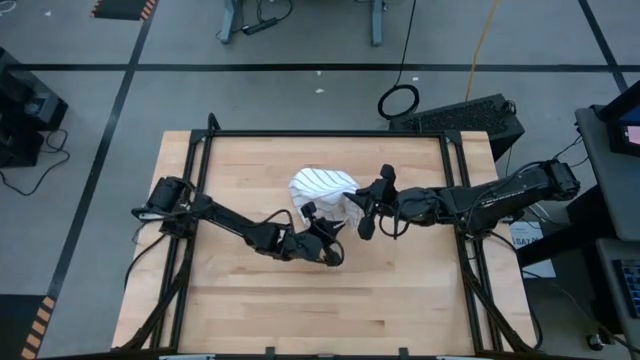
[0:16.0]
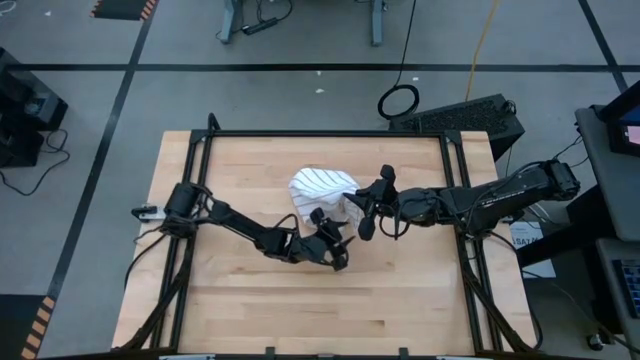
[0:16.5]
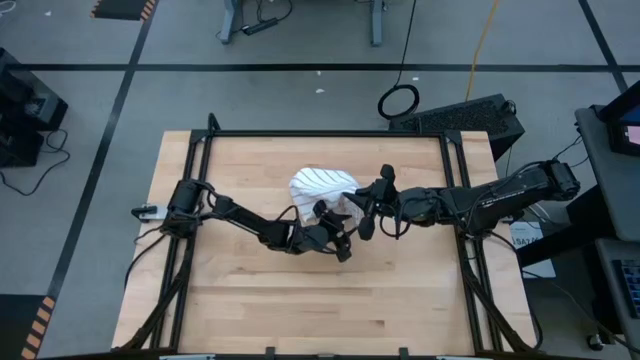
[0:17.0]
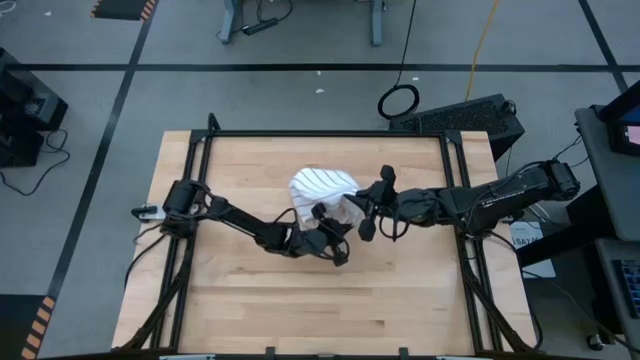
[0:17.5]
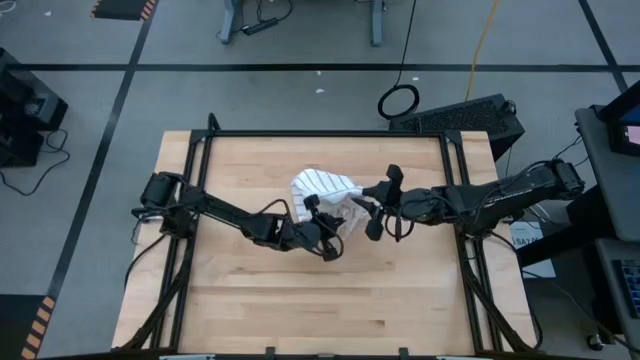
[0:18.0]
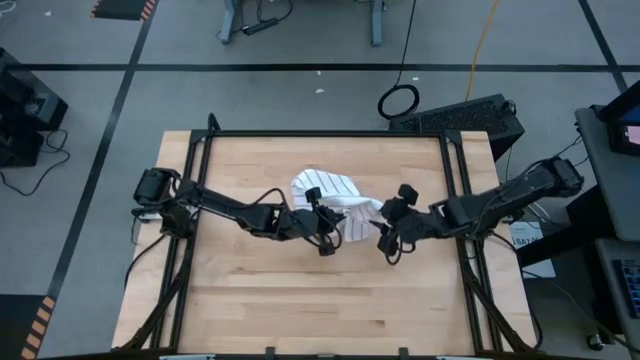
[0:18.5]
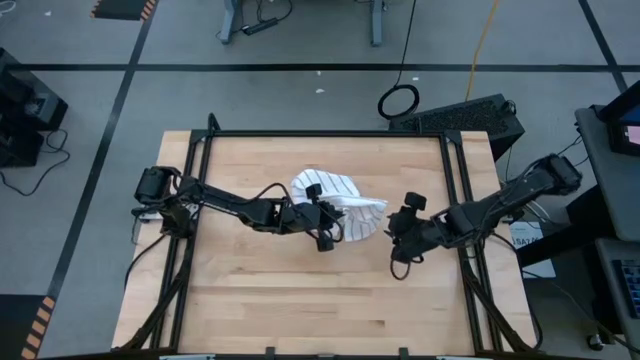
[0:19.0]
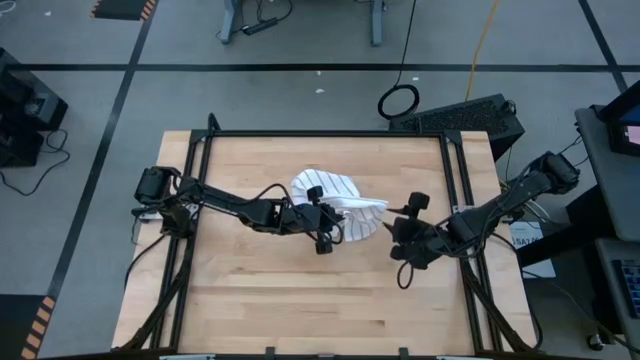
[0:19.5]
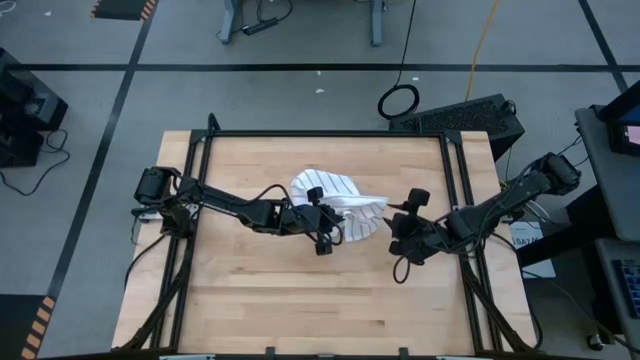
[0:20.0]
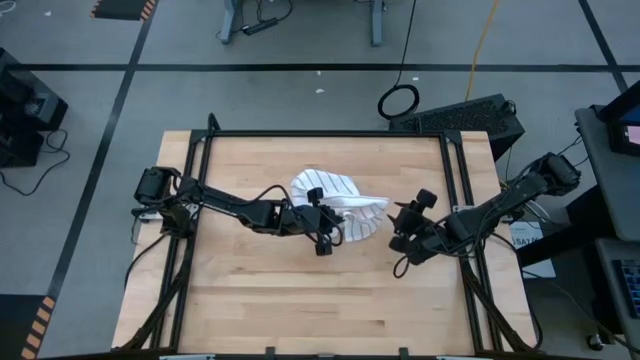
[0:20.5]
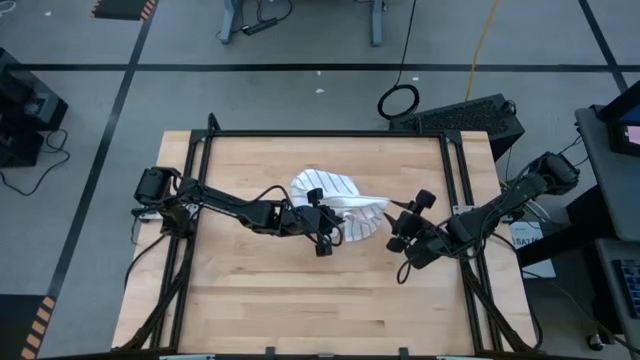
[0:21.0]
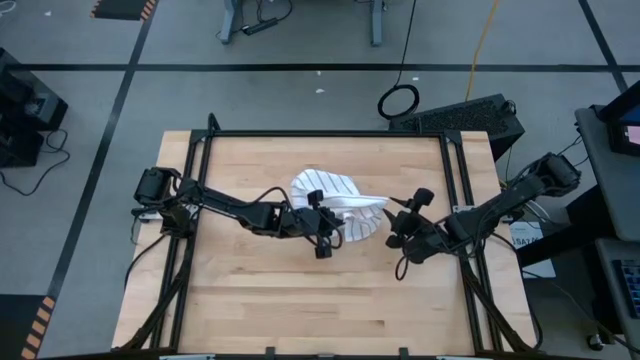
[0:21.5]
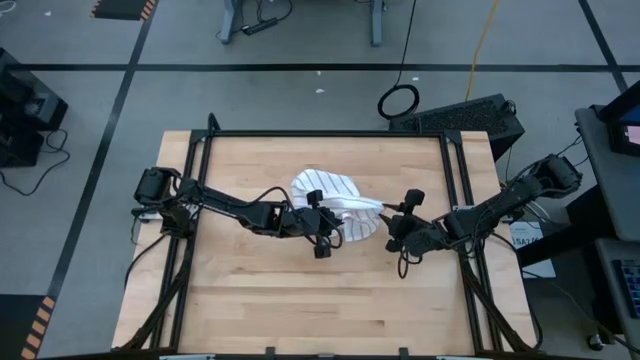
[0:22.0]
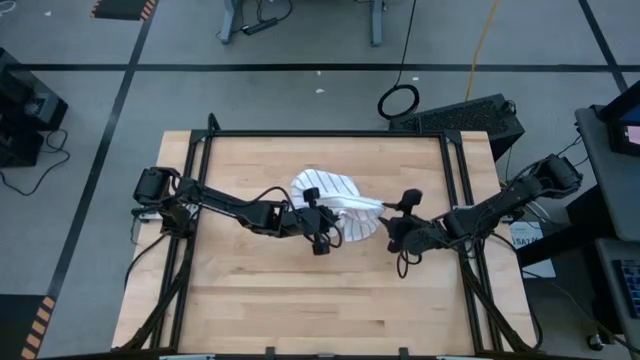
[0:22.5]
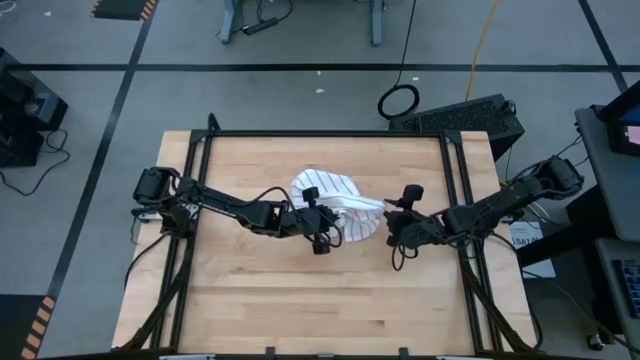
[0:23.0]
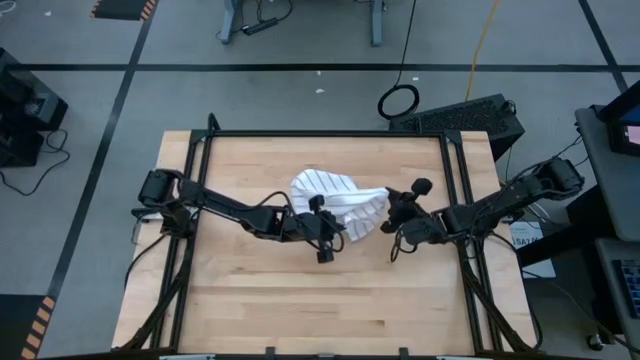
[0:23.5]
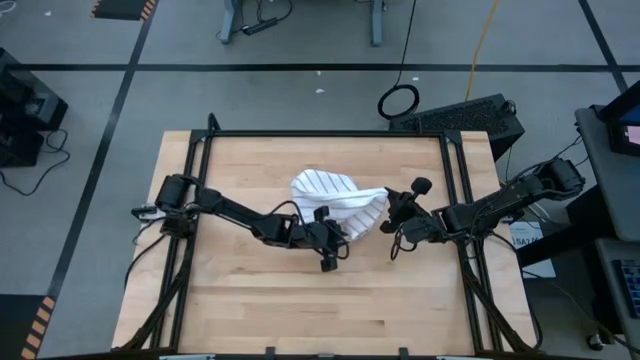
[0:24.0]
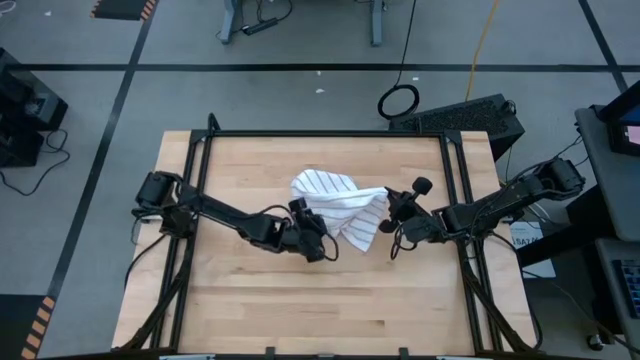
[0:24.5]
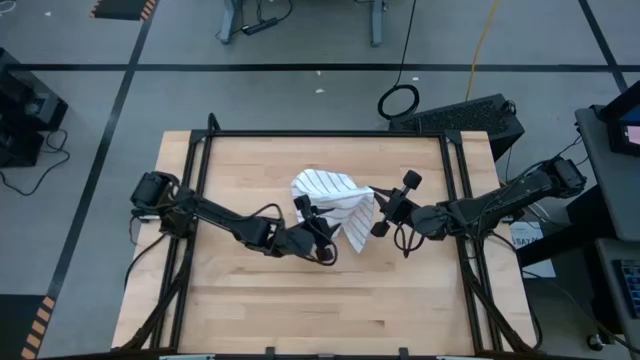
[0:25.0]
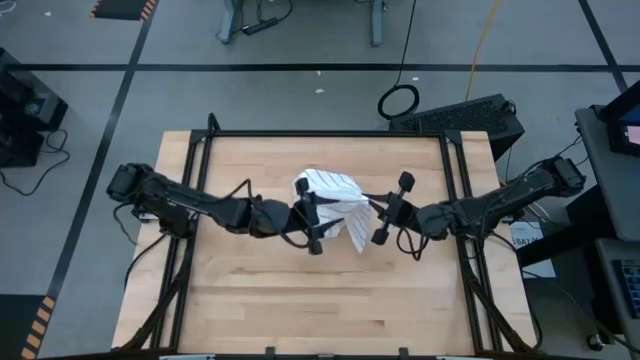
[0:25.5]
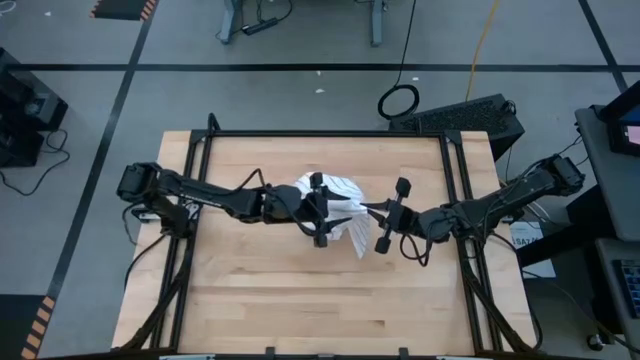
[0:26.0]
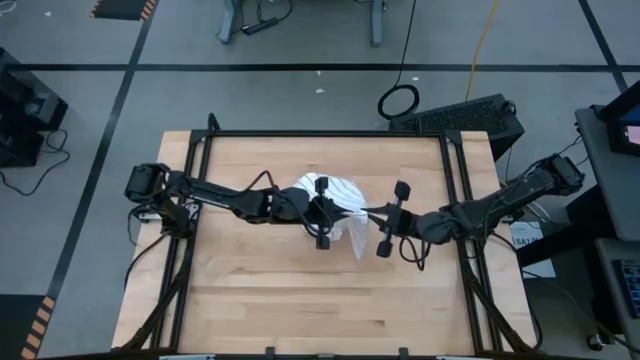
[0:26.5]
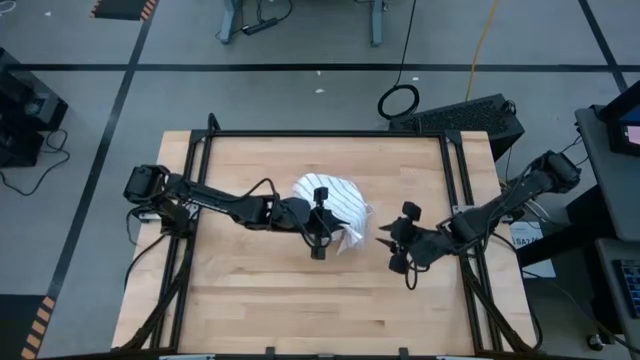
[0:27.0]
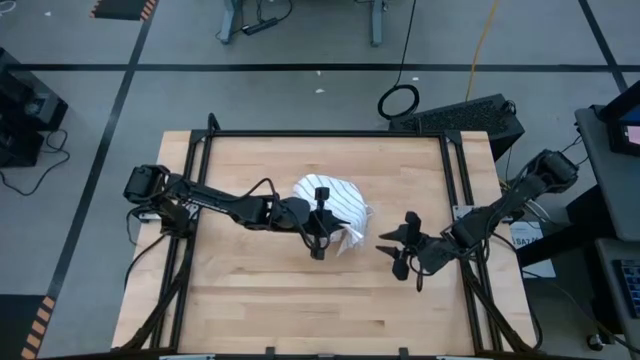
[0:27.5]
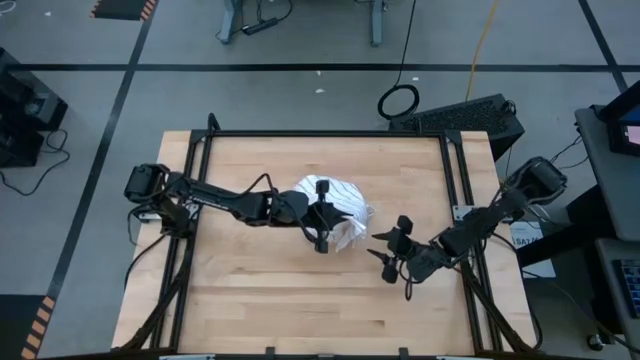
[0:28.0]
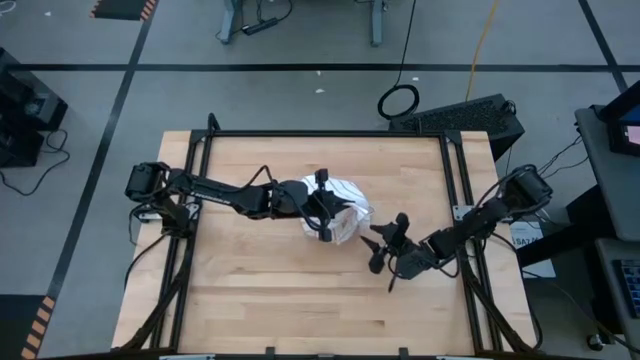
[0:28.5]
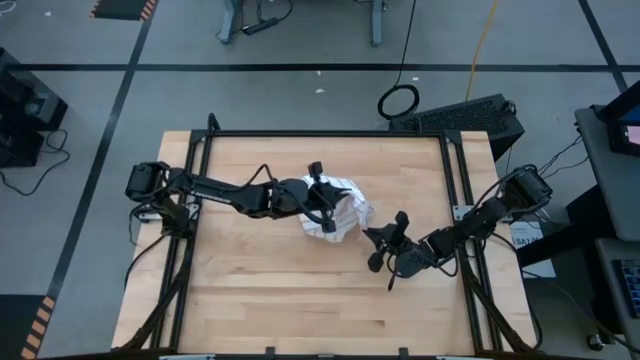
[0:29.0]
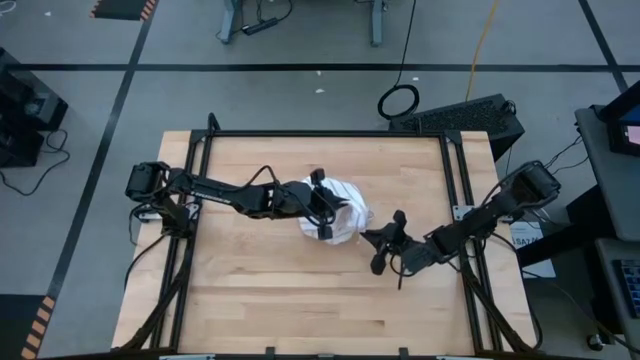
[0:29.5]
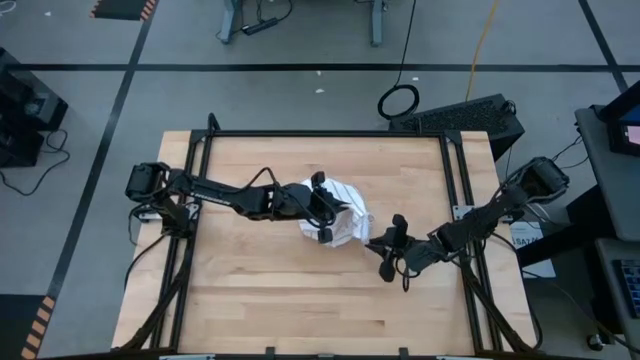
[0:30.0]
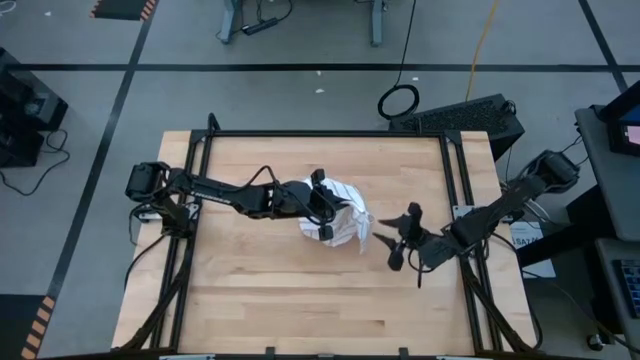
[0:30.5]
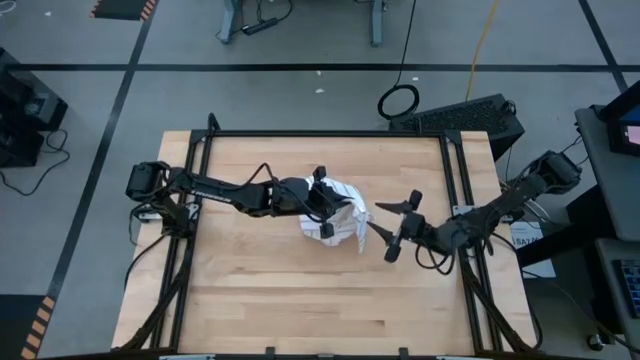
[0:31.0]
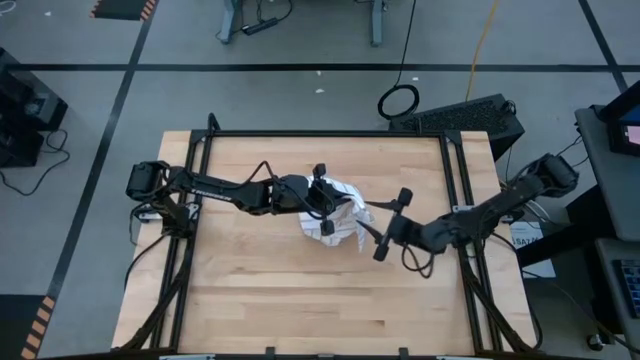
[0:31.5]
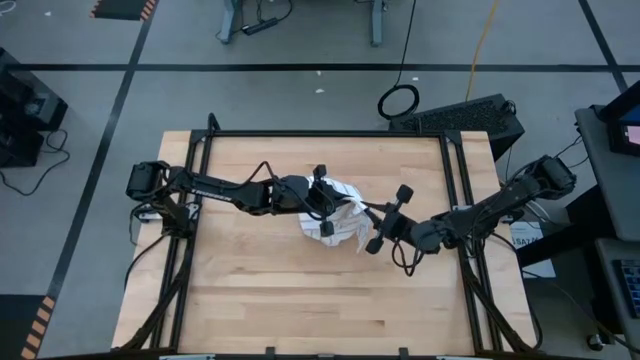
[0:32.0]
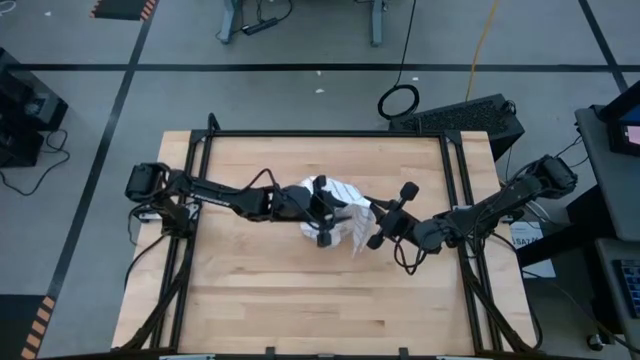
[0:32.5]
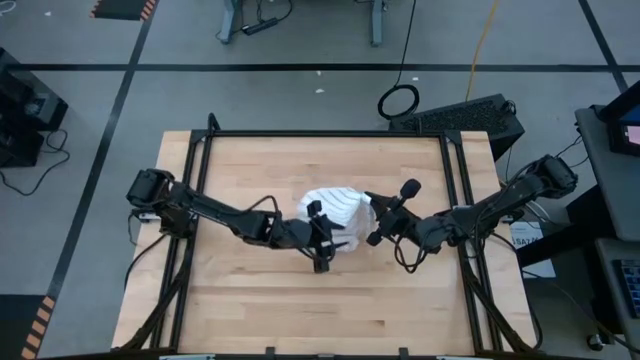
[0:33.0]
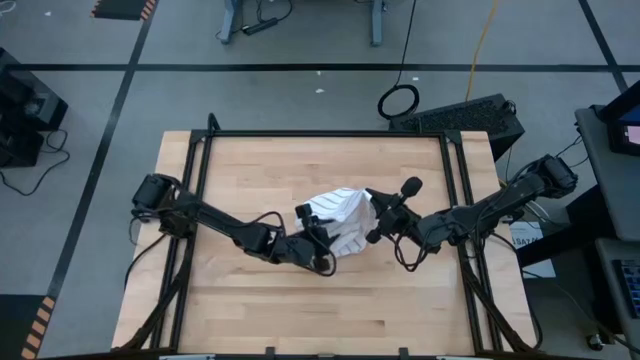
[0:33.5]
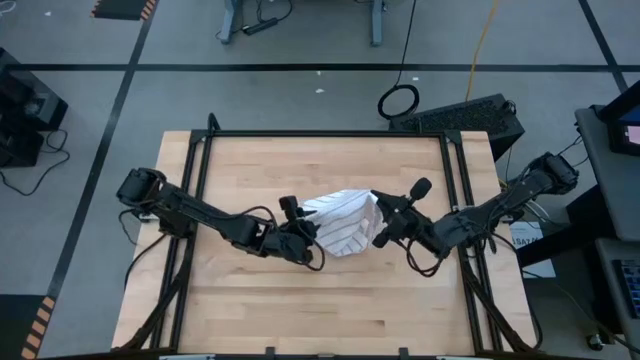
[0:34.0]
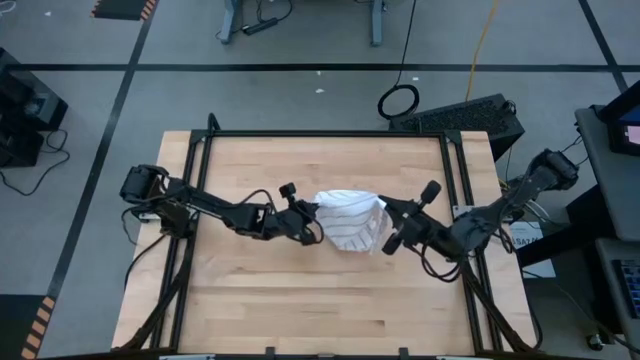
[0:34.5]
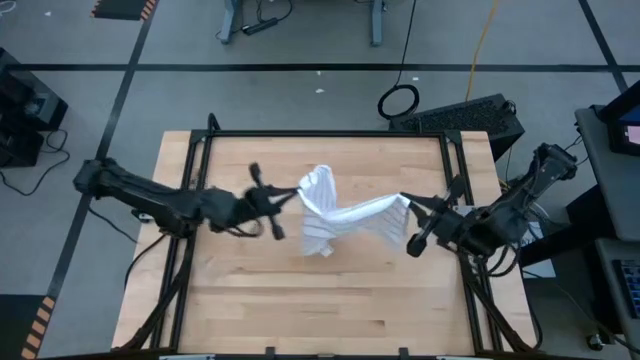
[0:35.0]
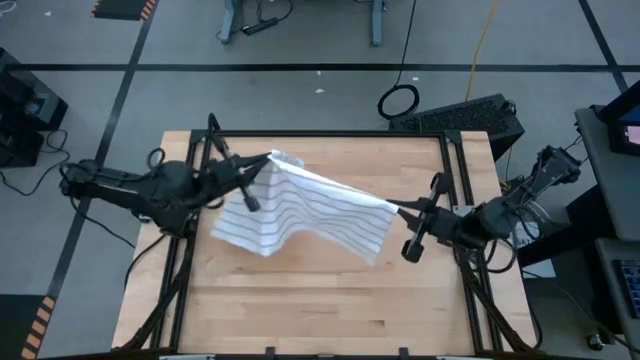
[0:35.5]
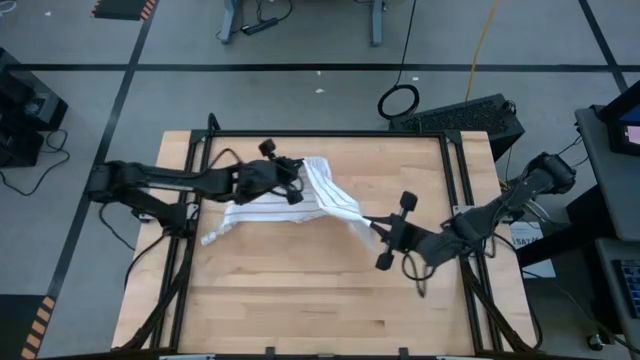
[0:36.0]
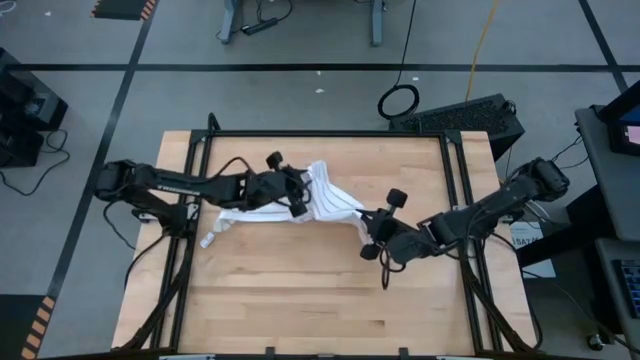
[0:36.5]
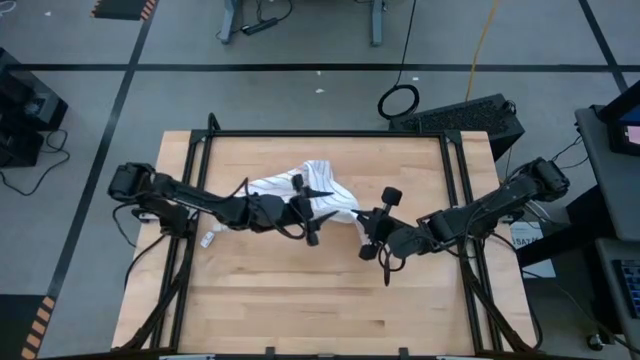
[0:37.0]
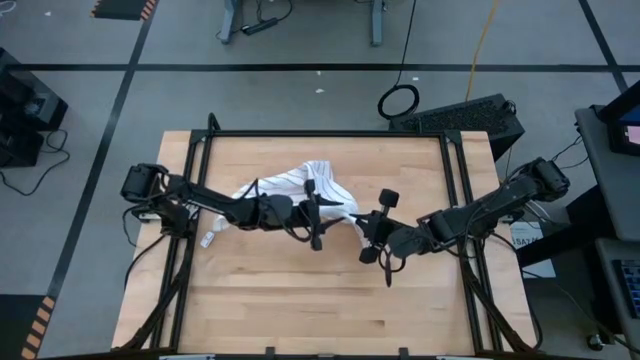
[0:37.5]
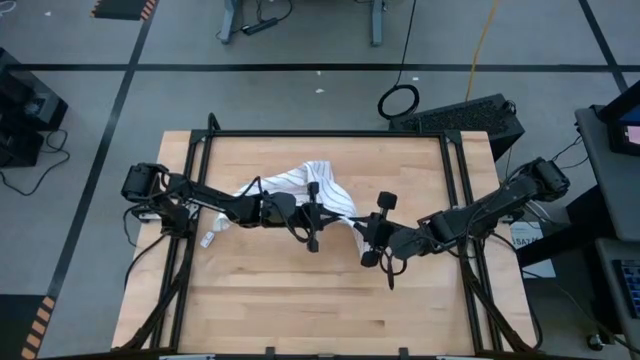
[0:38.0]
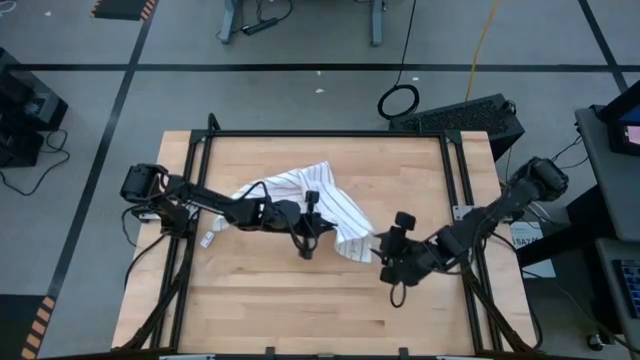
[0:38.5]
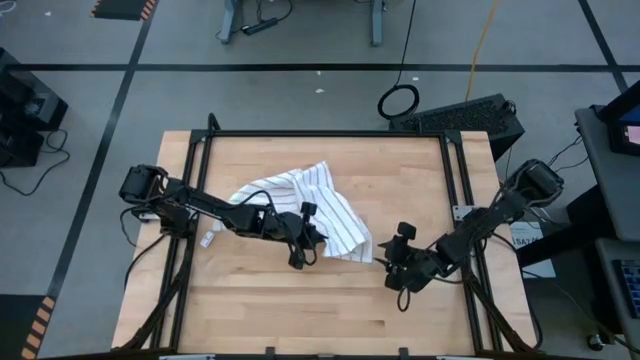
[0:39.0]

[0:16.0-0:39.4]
Task: Roll towel into tight, uniform cylinder
Fold the white brown kitchen towel
